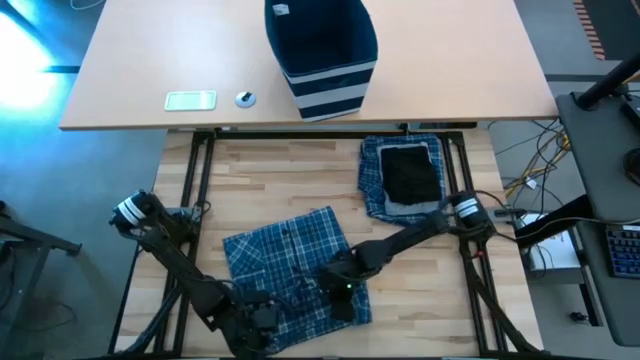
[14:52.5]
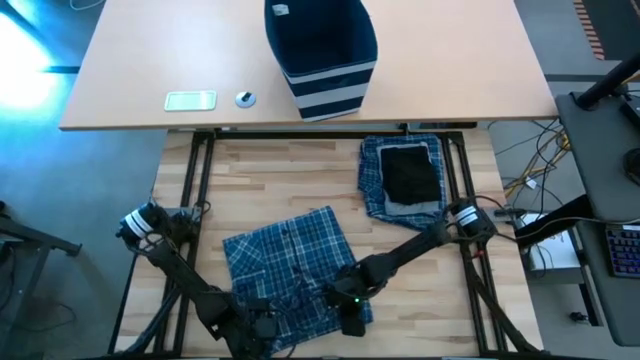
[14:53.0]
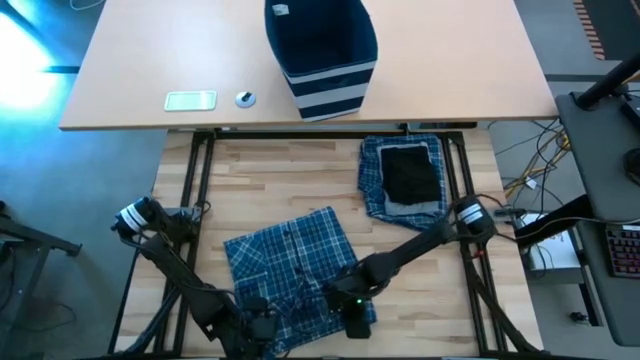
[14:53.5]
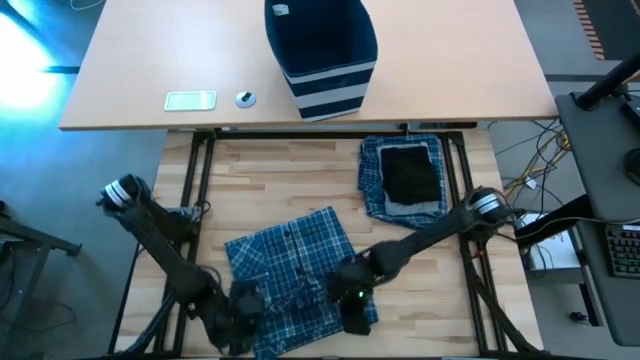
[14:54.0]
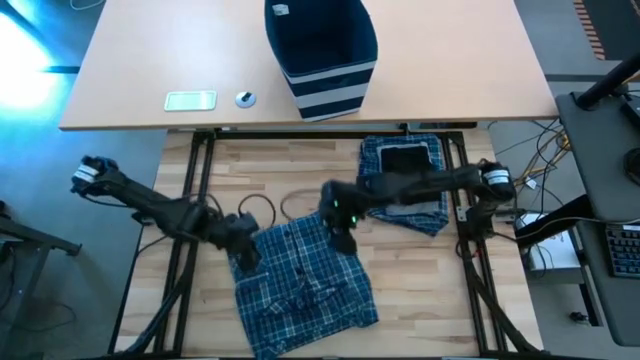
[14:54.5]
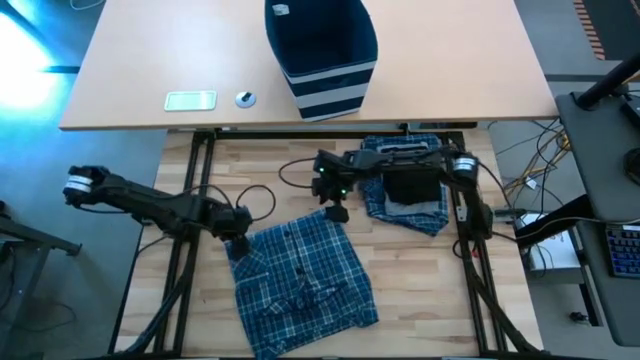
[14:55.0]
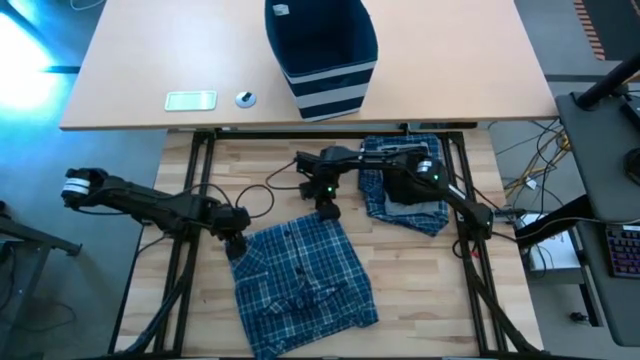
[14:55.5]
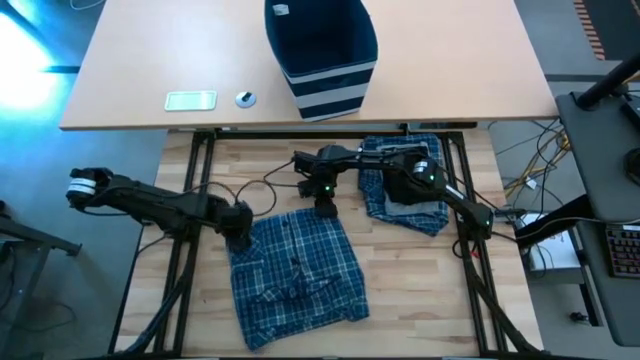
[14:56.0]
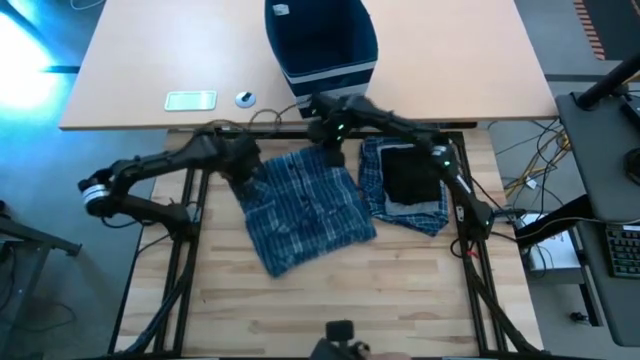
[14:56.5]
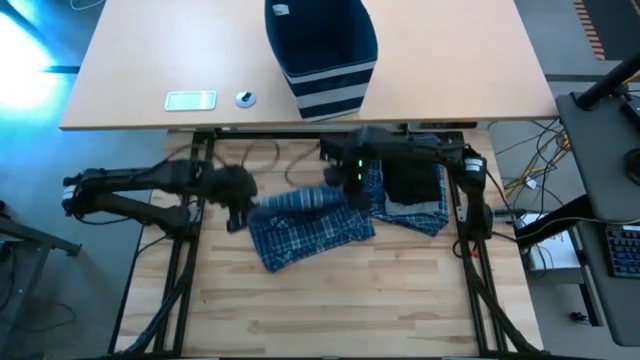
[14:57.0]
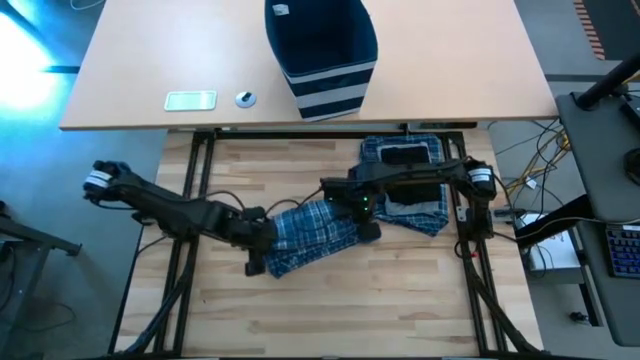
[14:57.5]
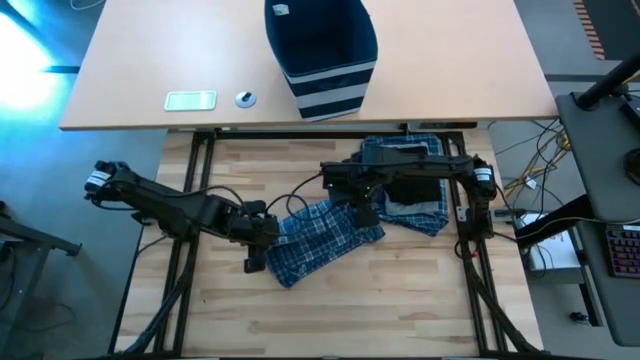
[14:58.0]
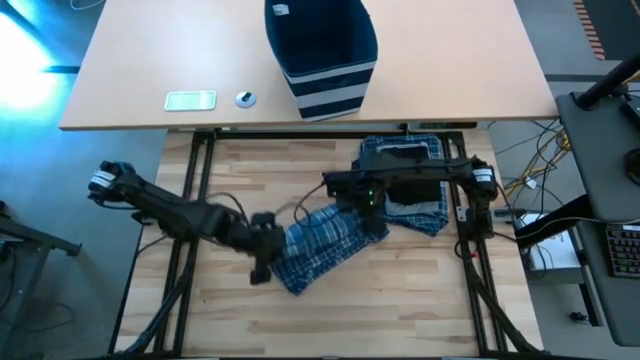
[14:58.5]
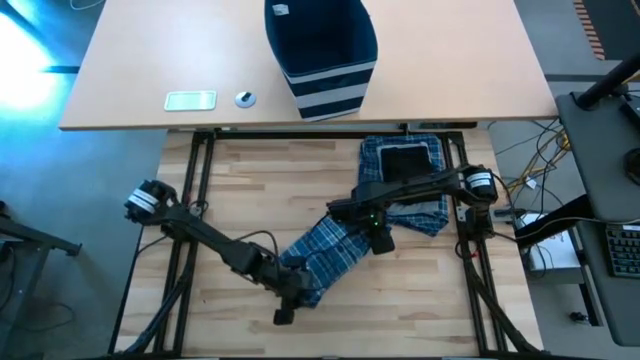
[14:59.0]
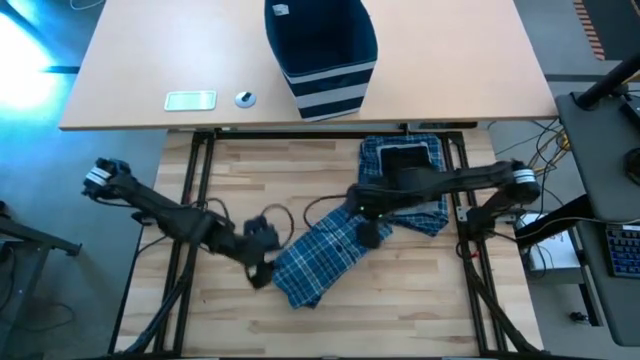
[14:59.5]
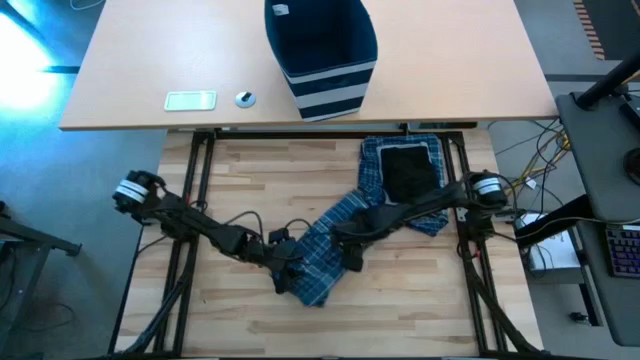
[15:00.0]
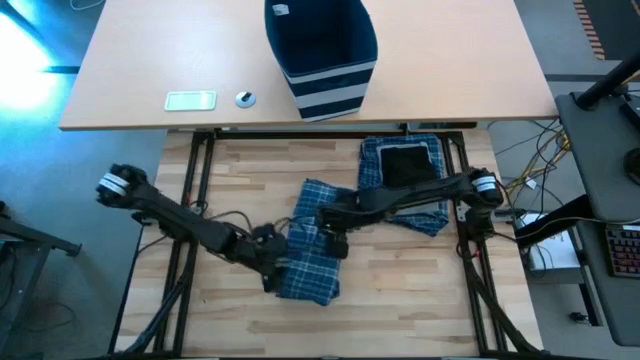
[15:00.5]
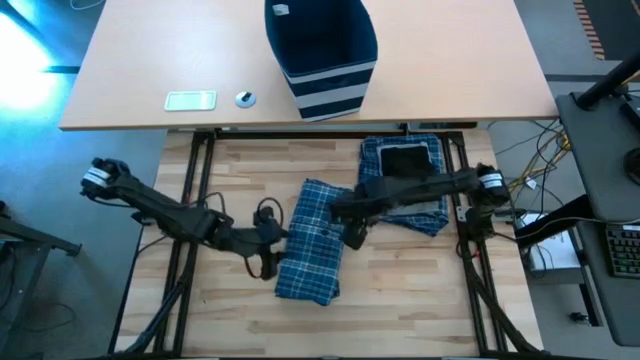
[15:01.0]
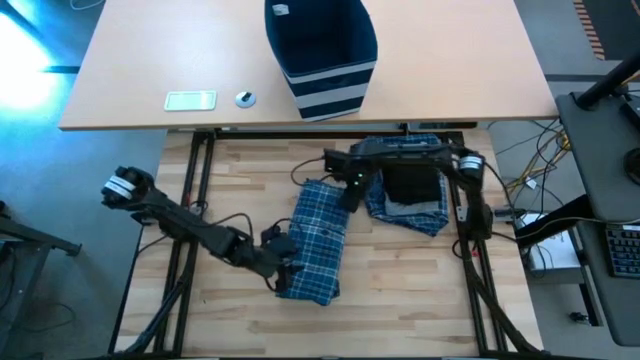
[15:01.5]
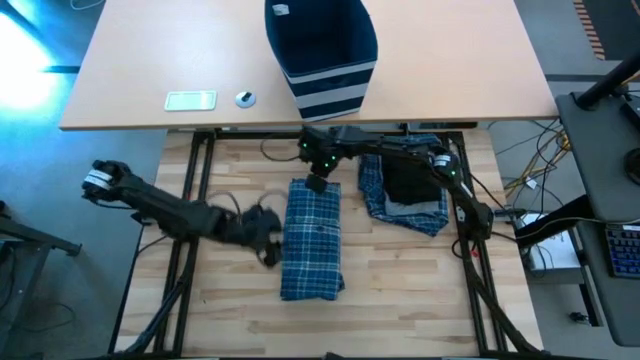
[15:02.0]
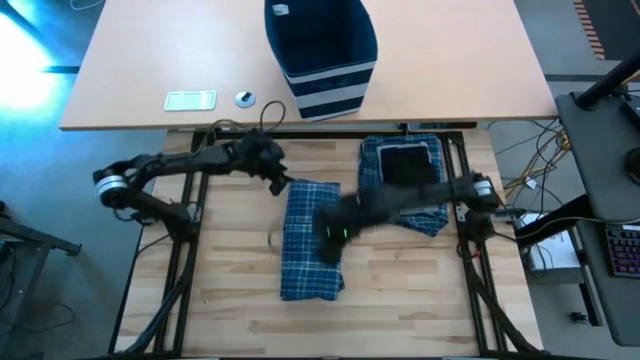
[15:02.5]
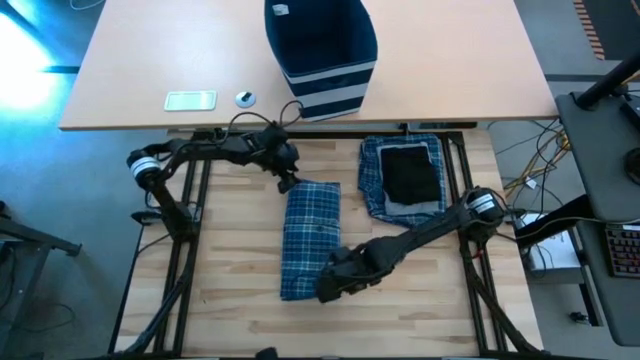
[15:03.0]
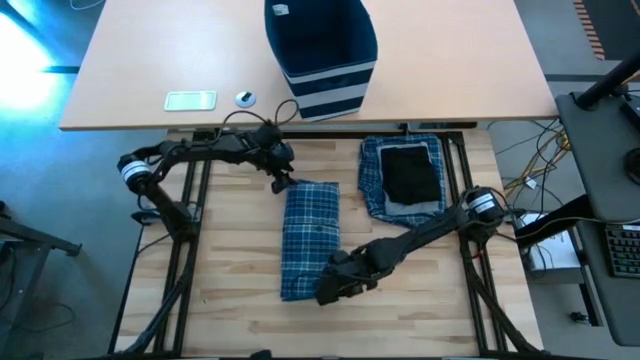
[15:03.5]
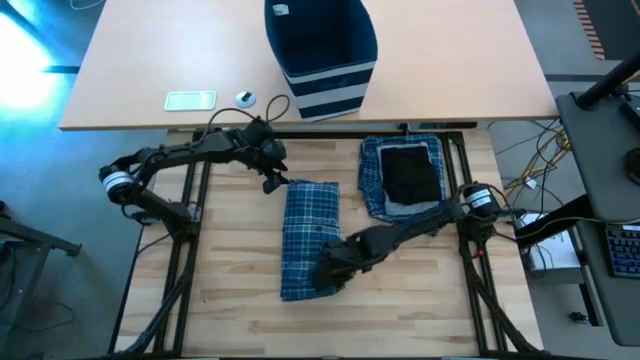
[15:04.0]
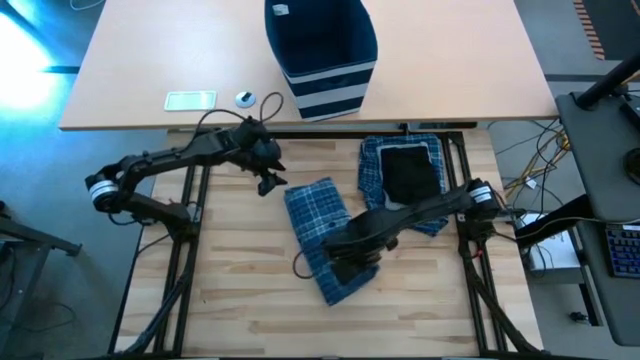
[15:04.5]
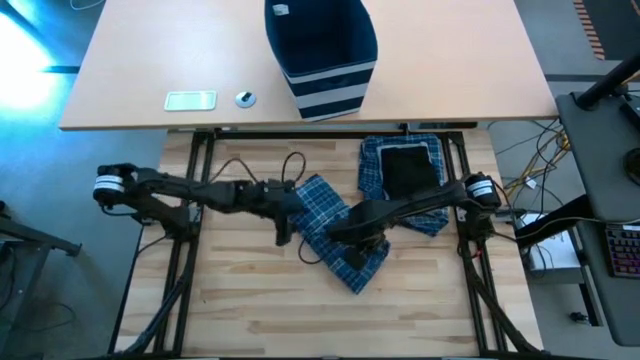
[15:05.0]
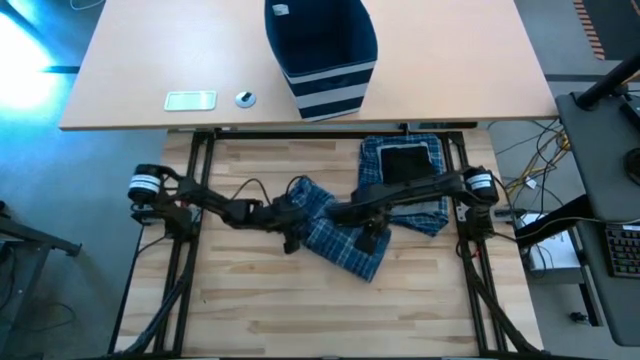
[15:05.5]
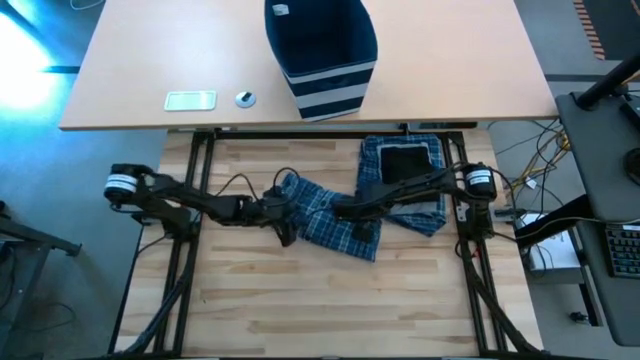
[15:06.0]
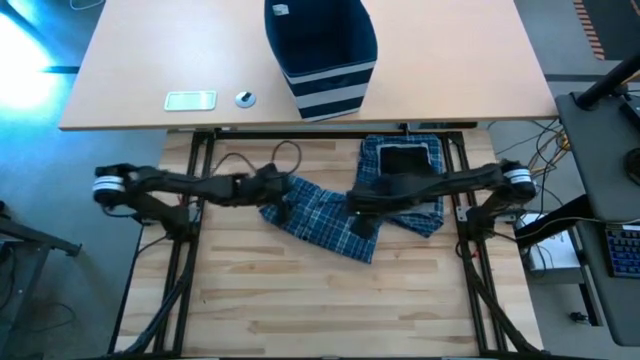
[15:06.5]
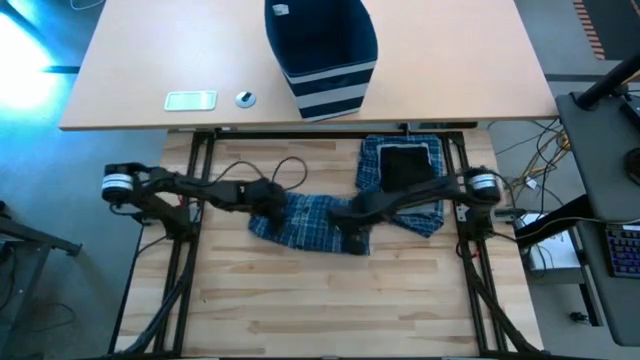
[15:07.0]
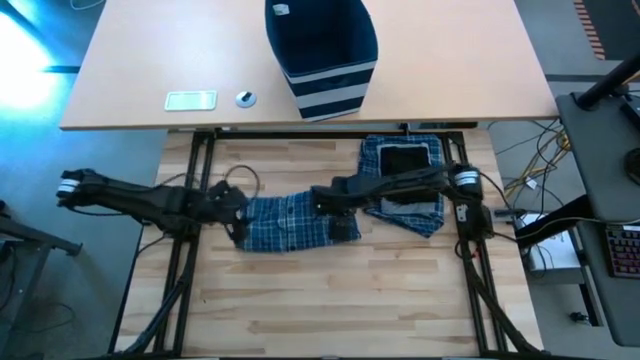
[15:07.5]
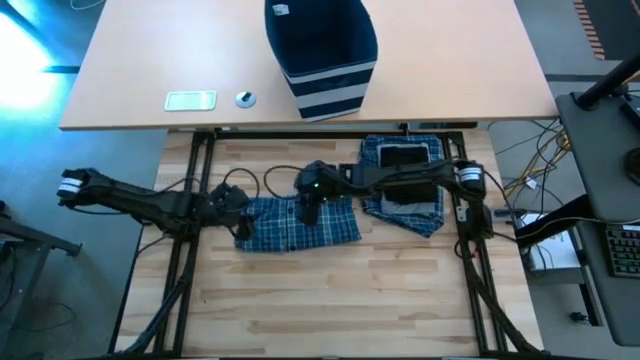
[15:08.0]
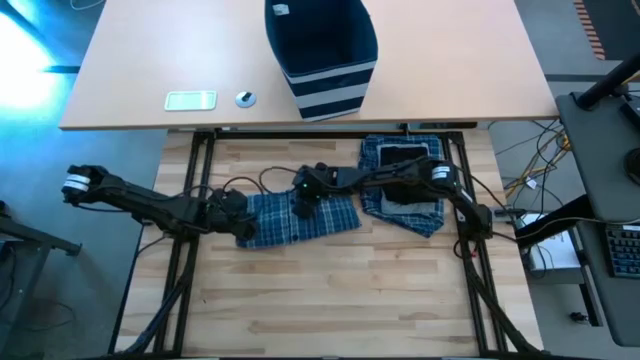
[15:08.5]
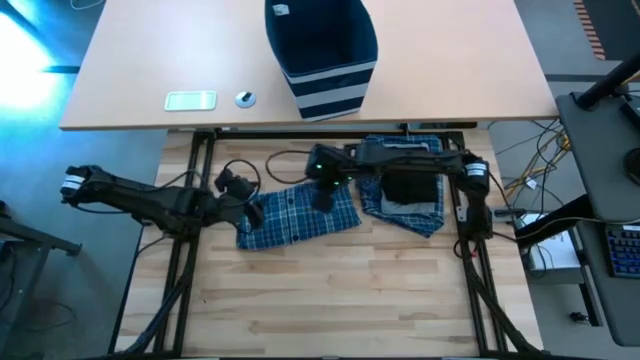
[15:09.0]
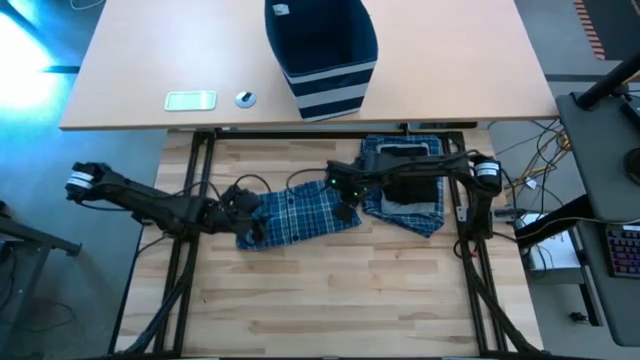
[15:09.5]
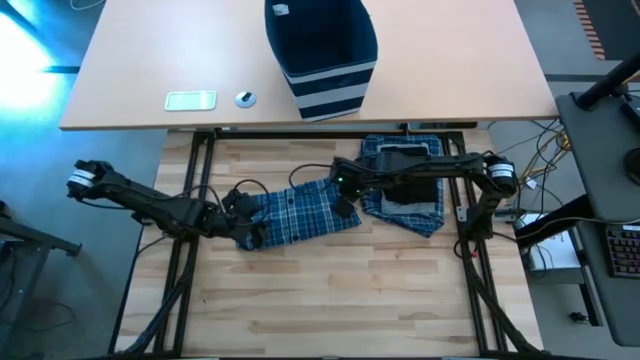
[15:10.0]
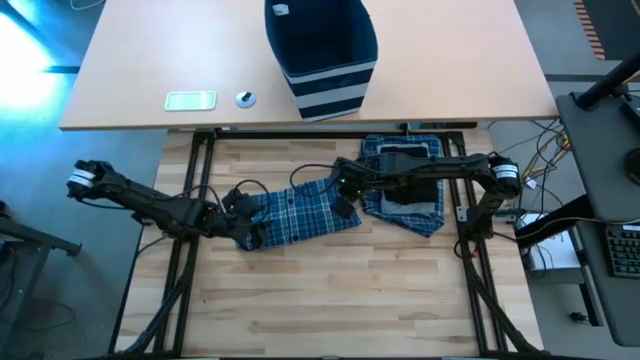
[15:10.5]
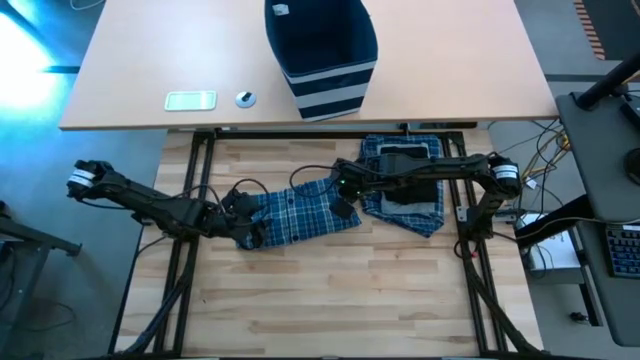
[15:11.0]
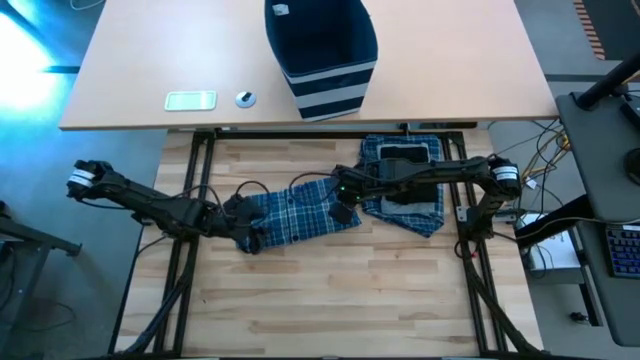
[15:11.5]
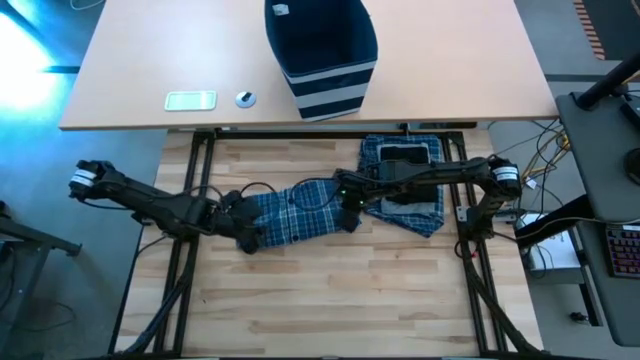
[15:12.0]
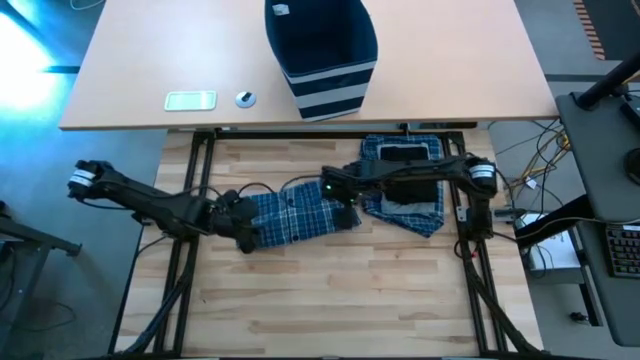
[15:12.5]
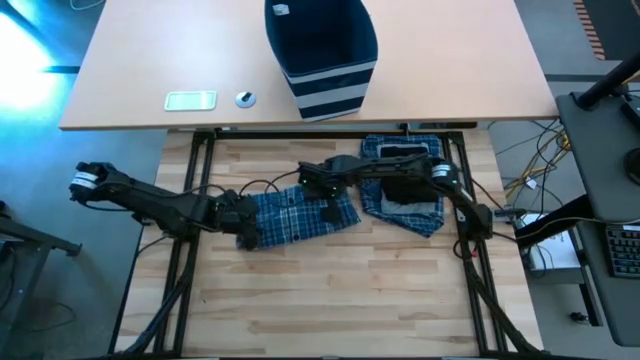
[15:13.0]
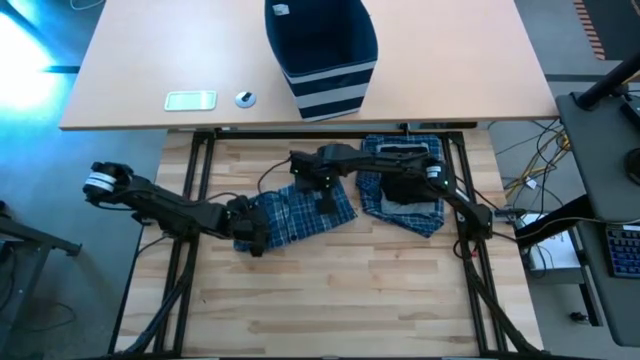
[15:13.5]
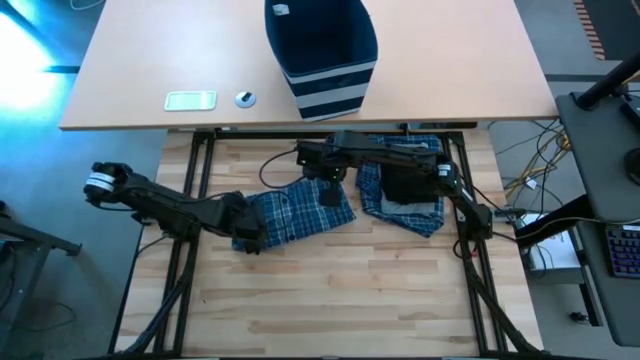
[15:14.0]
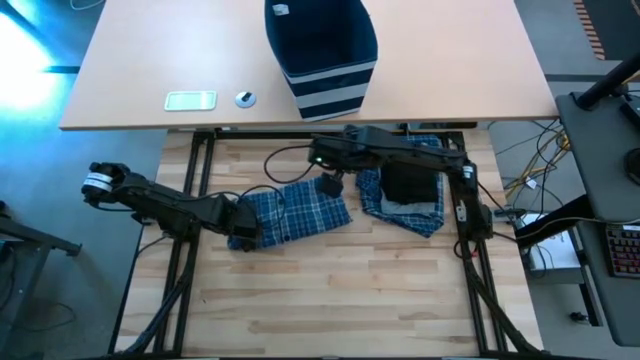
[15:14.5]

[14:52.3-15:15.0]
Task: Fold Laundry from Bin
Fold the blue patterned long sleeve
